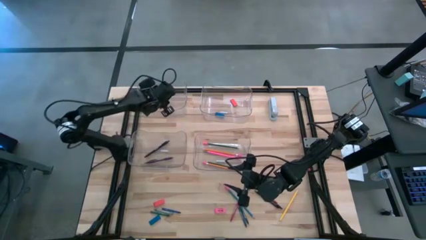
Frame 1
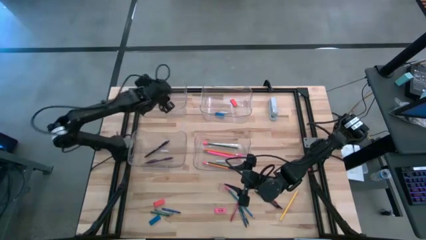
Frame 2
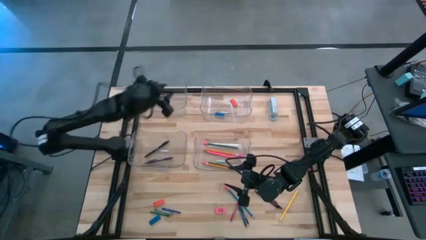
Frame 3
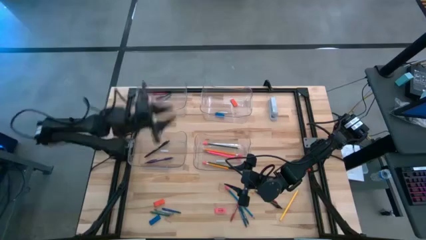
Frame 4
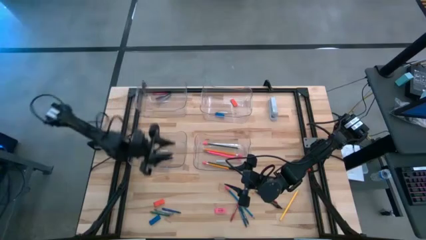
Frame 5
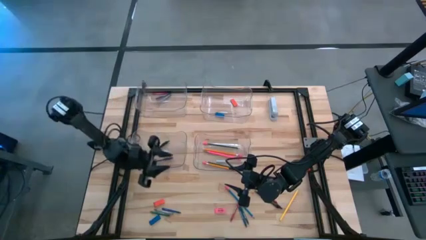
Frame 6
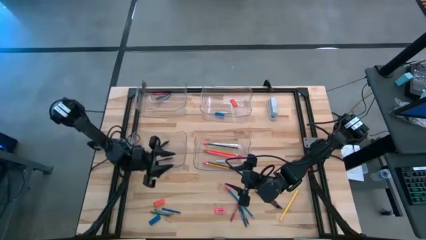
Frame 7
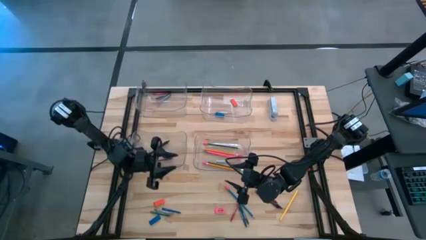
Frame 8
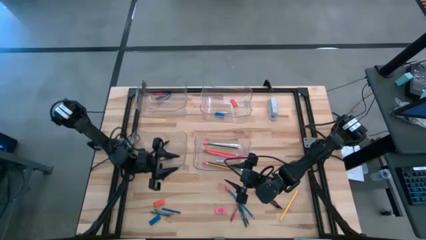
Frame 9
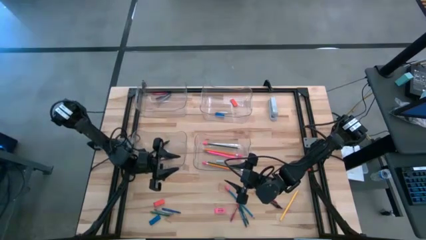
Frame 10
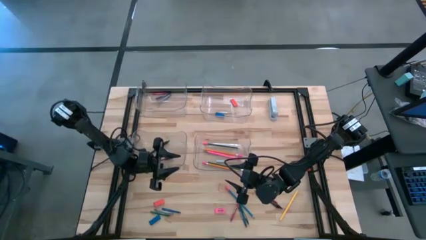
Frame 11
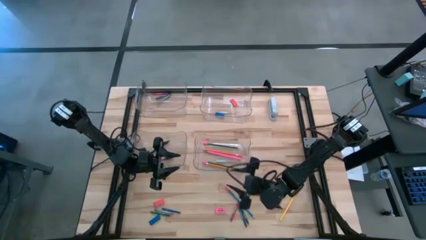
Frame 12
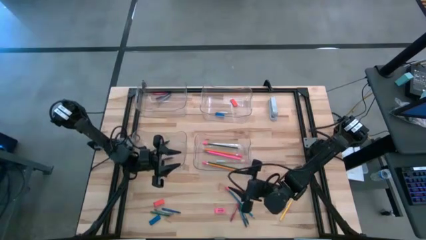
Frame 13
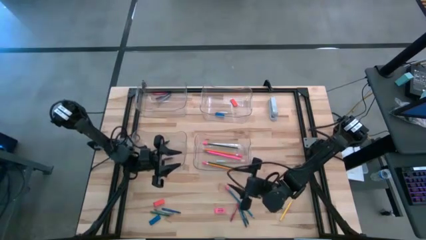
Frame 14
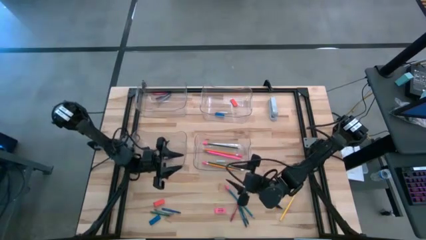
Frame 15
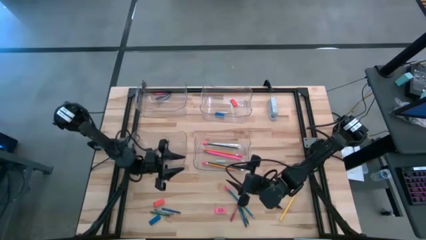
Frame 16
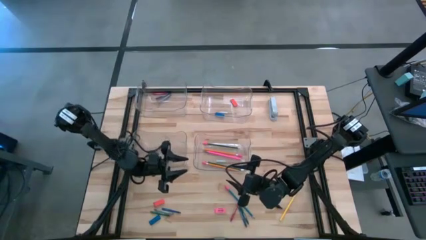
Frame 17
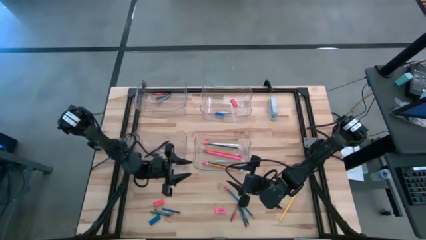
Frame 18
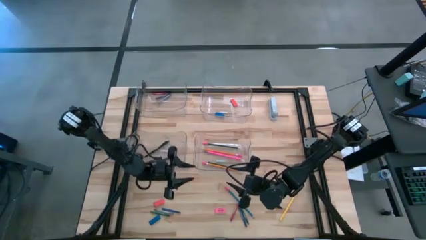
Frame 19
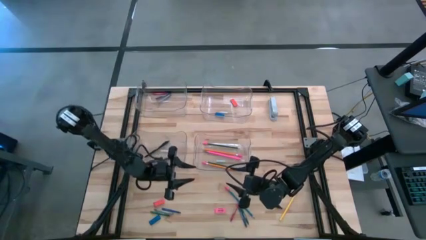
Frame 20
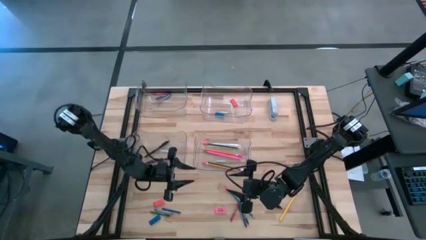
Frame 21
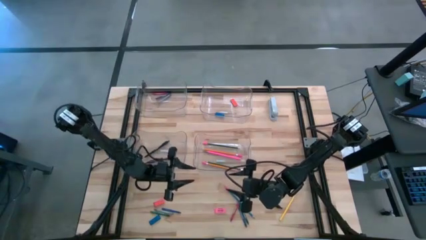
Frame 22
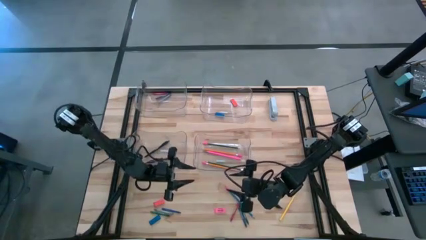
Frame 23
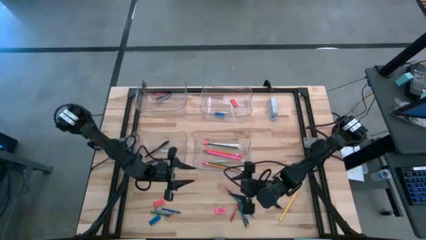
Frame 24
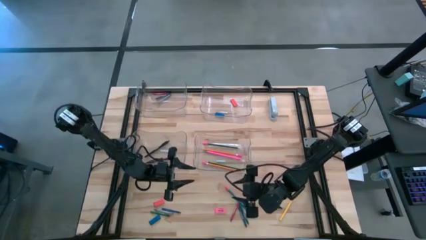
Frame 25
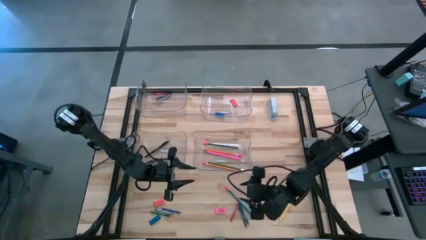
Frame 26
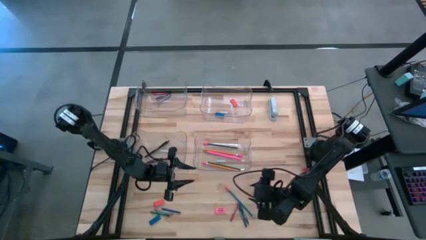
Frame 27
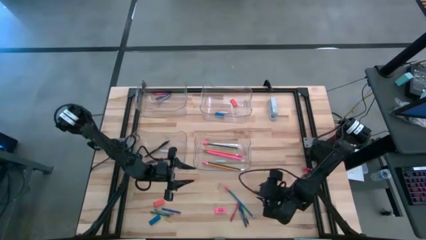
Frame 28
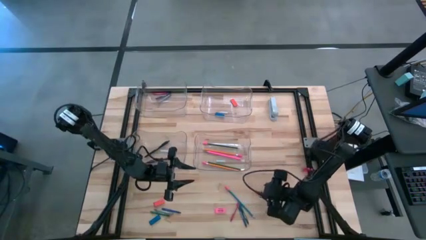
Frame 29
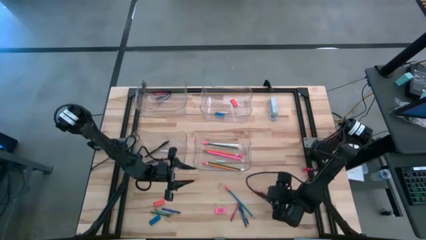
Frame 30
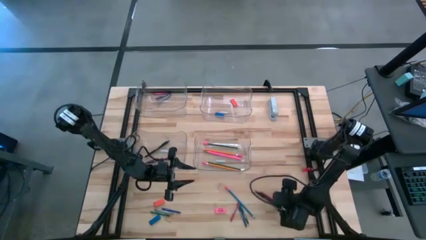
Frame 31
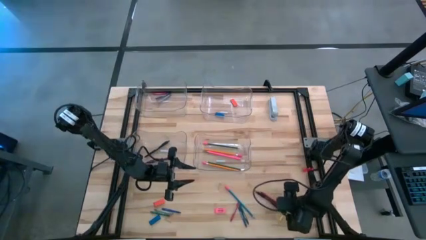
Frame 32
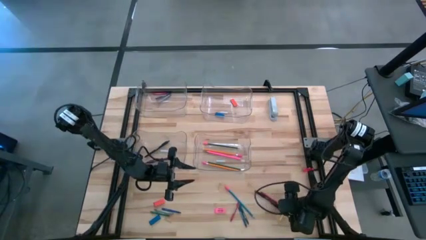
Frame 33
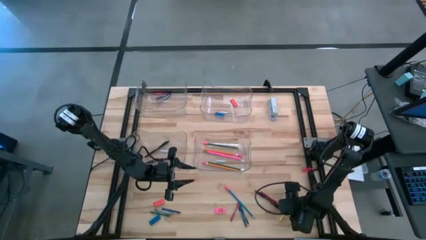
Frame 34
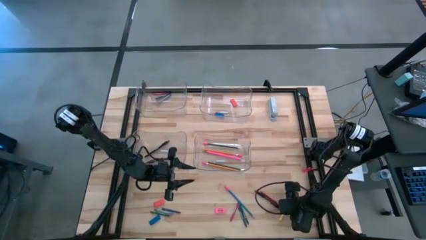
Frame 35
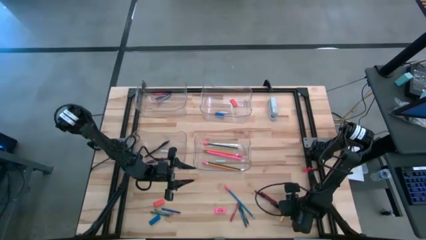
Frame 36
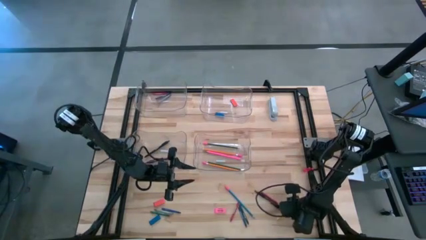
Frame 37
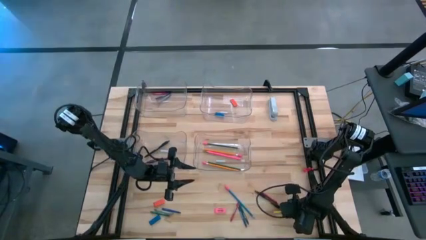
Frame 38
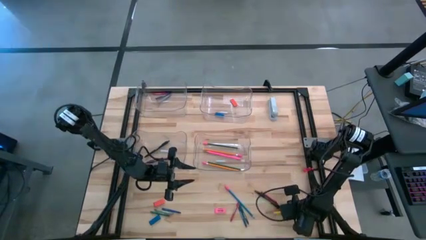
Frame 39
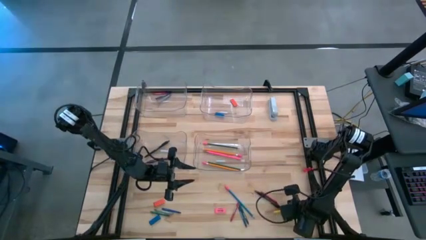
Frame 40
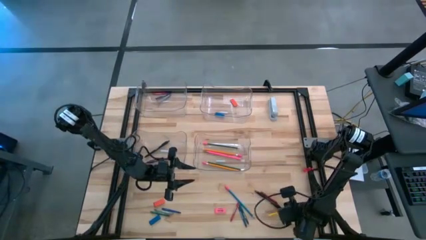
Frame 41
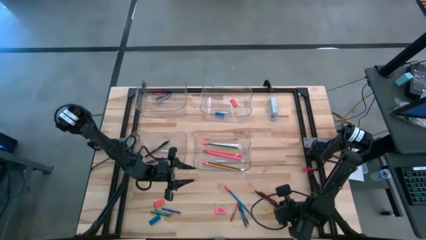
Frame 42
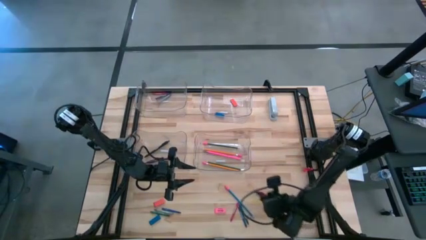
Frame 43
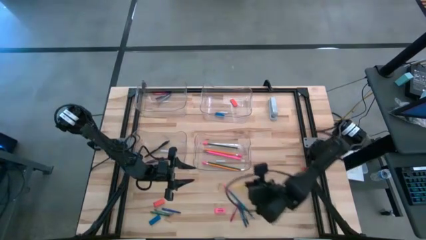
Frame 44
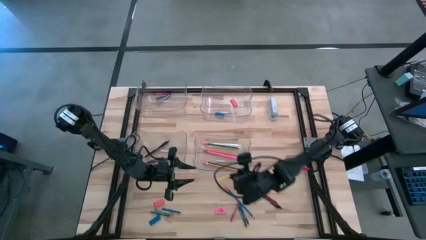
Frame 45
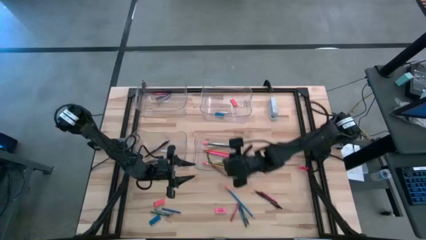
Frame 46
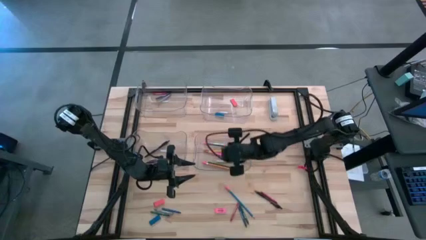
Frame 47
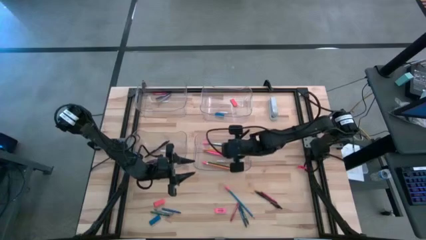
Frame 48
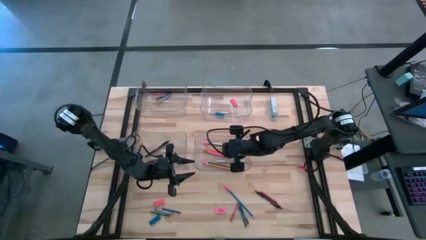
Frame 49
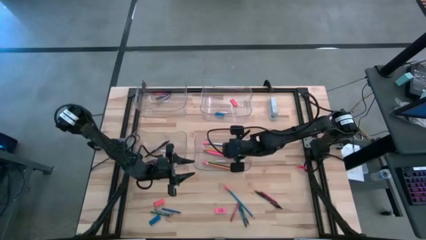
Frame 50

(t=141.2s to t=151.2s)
Task: Sort crayons/erasers/pens/pencils in bins
Put the yellow pencil into the bottom right transparent bin

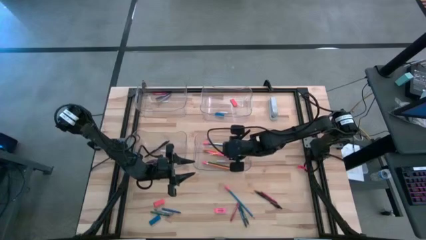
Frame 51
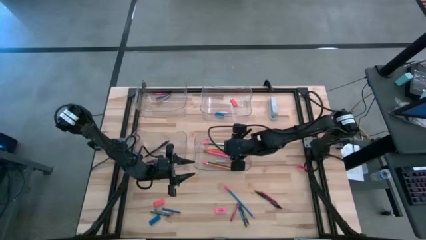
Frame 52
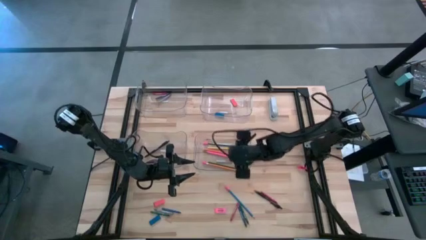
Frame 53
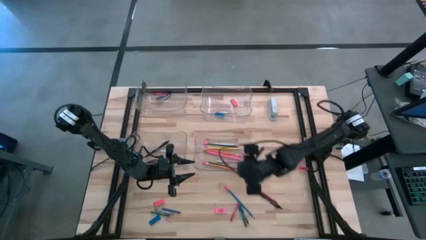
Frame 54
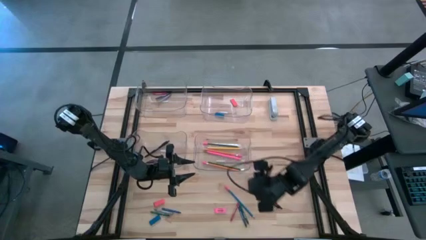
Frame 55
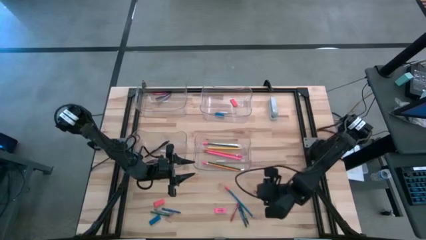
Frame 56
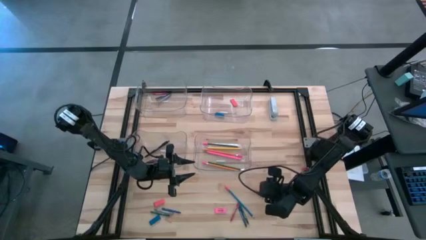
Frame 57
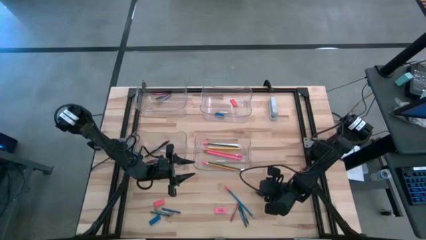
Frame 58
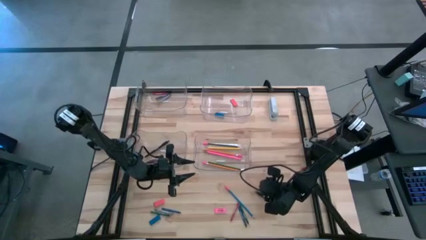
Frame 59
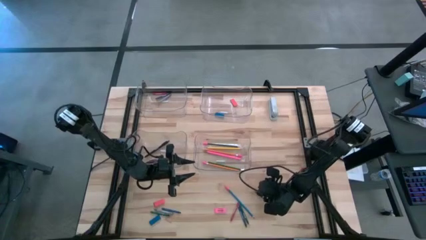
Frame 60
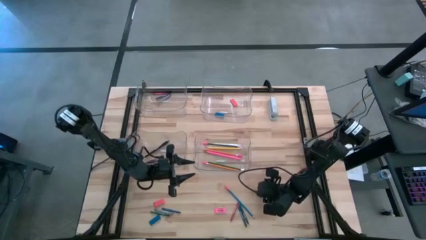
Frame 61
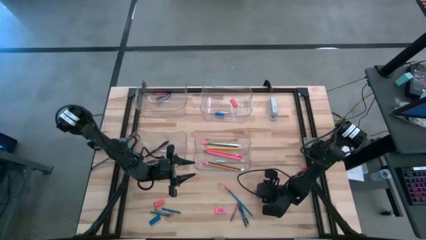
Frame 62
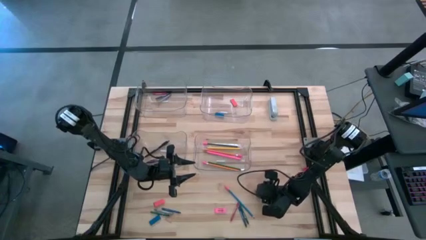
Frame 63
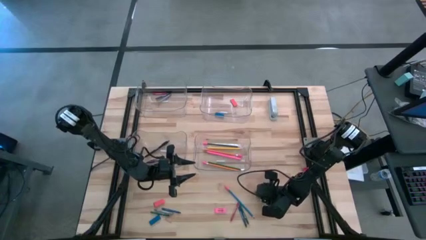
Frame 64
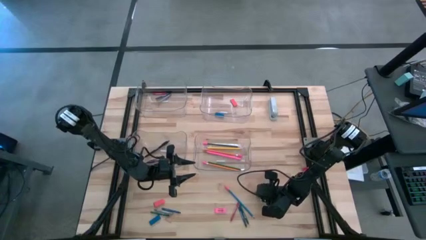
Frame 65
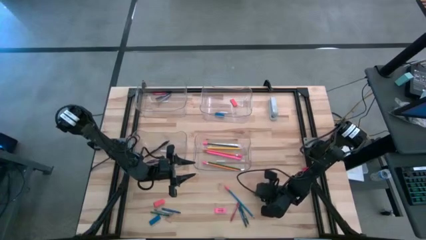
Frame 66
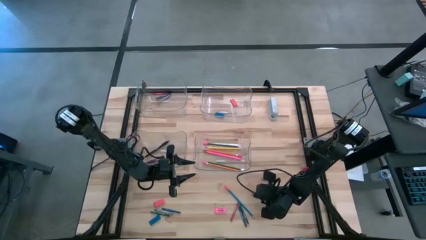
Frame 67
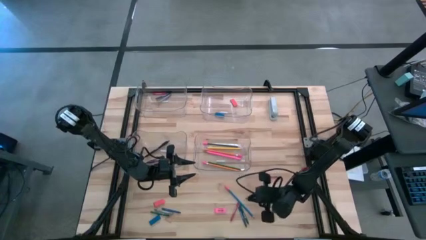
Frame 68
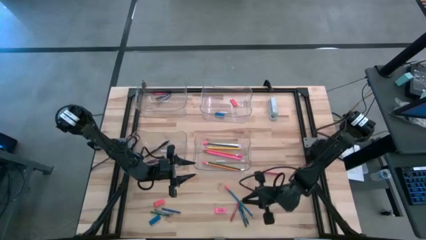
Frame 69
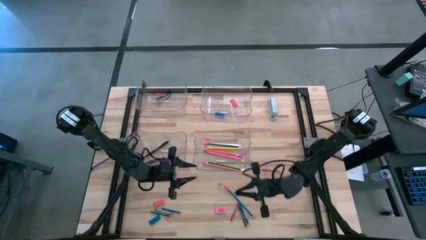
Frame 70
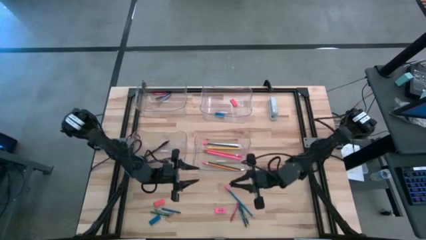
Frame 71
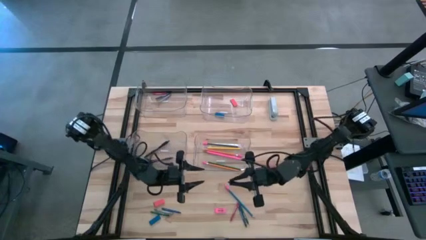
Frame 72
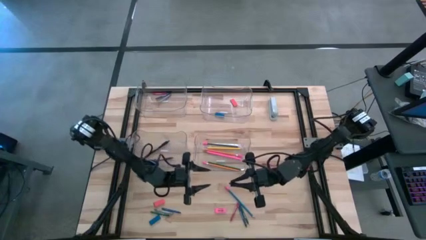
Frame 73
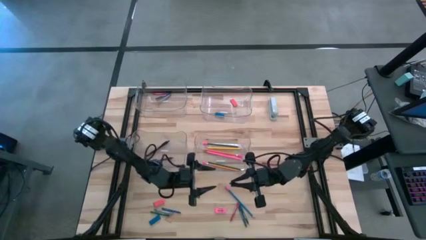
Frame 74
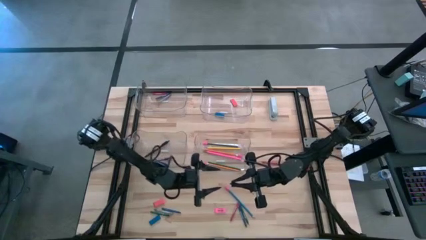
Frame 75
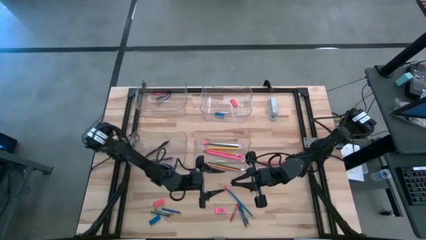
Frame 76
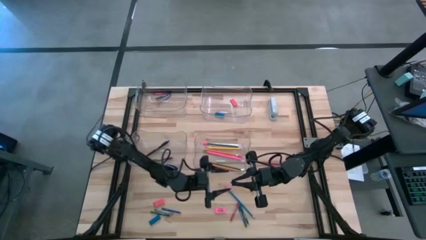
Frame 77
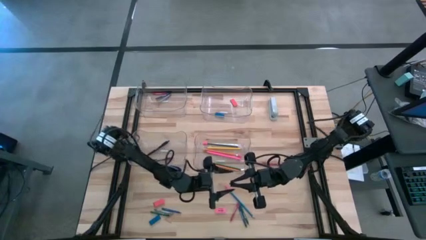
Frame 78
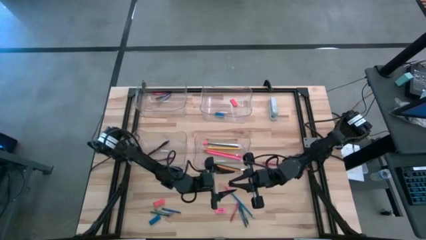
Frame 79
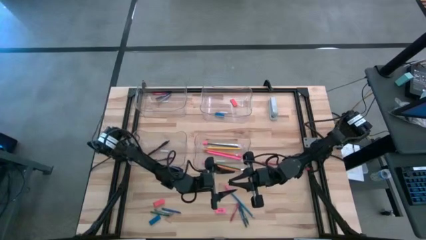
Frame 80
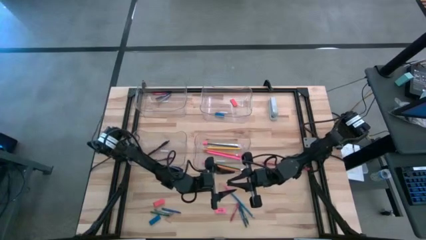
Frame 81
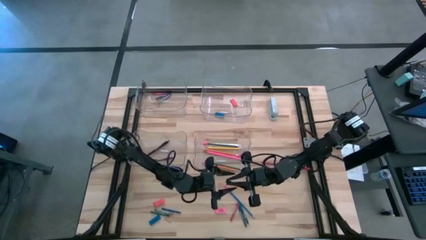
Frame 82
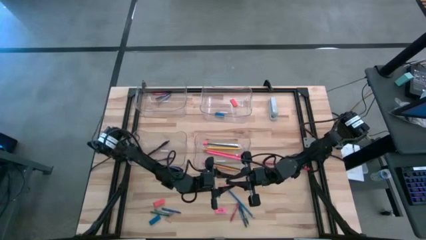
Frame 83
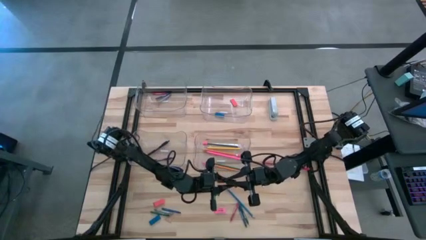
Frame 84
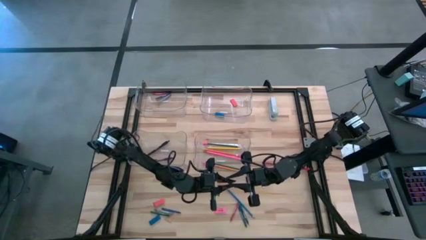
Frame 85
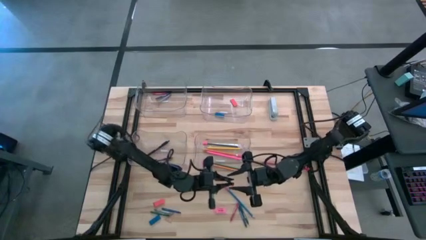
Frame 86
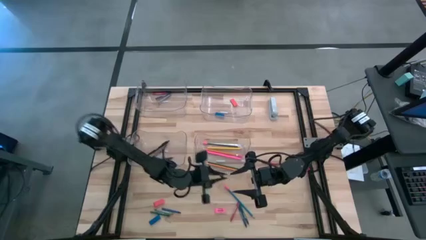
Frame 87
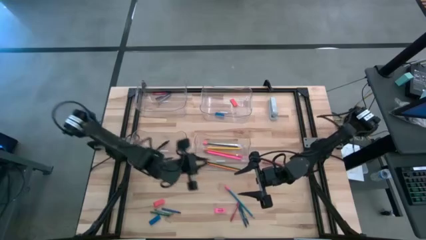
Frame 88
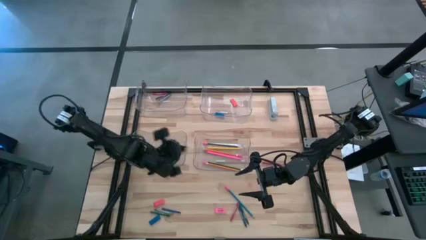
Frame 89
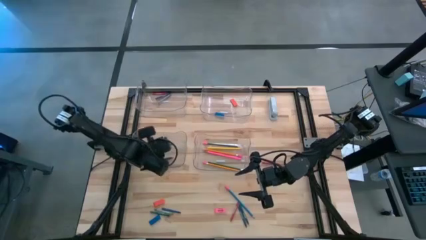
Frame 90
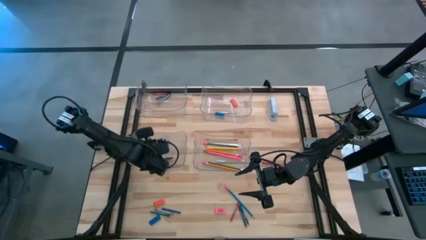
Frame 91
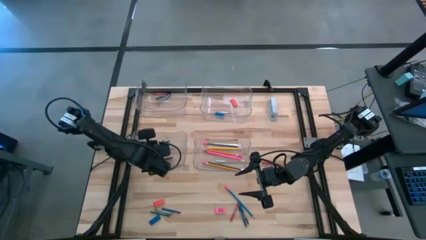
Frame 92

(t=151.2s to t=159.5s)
Put the black pen into the bottom left transparent bin
